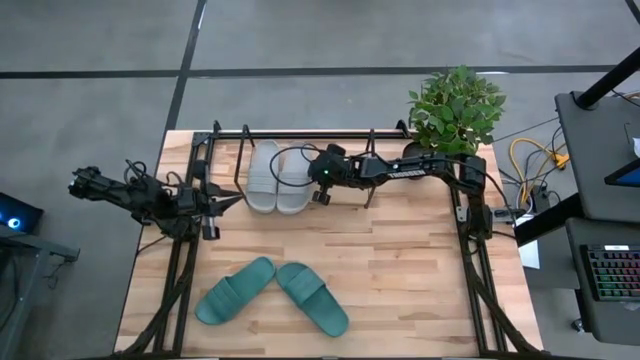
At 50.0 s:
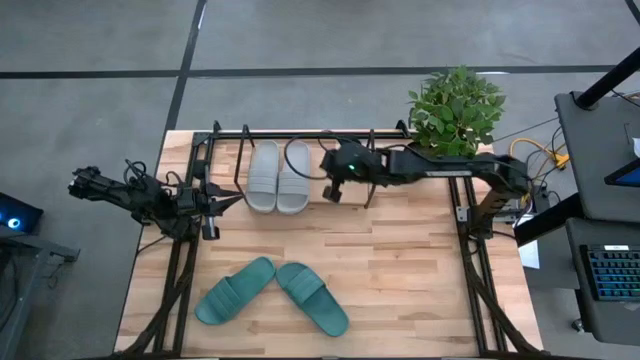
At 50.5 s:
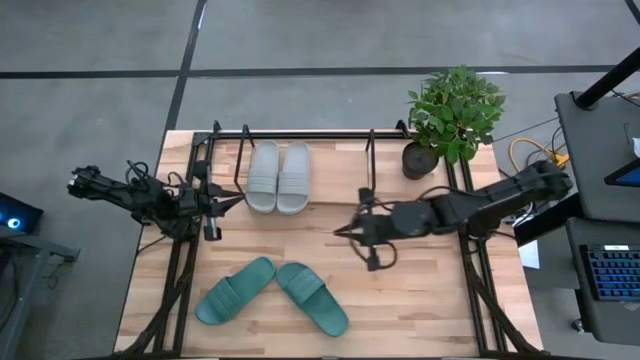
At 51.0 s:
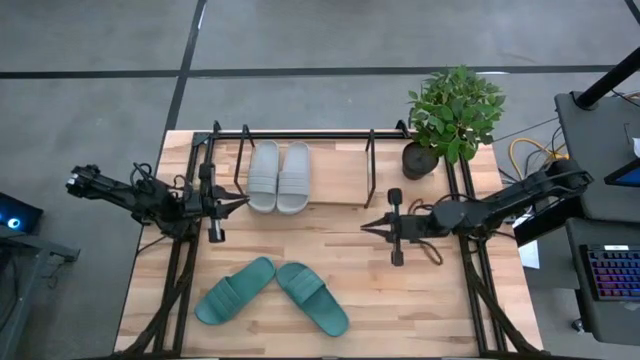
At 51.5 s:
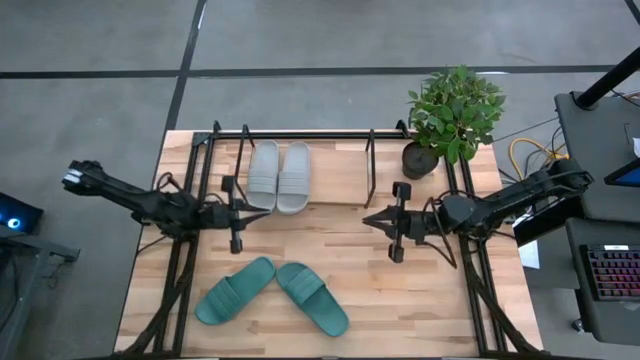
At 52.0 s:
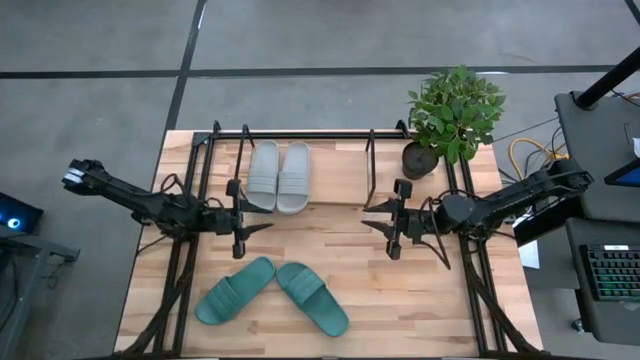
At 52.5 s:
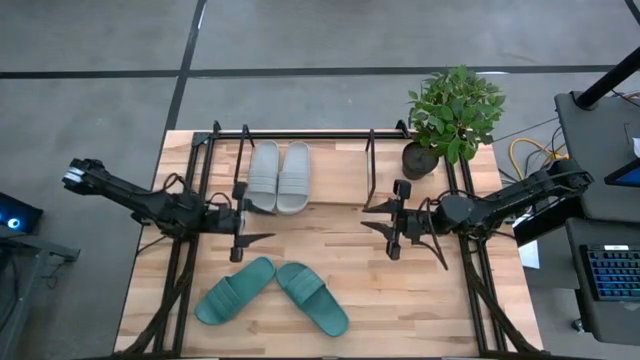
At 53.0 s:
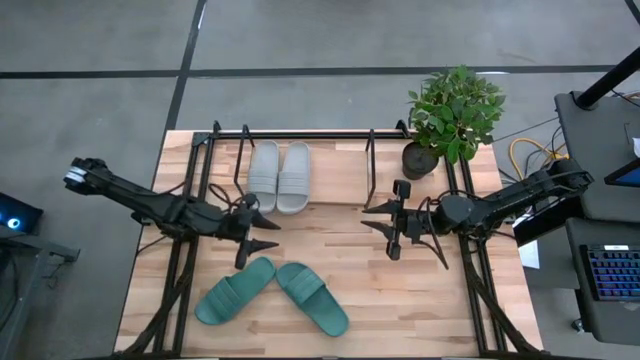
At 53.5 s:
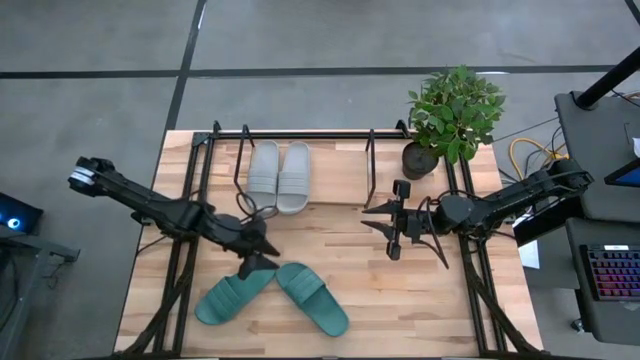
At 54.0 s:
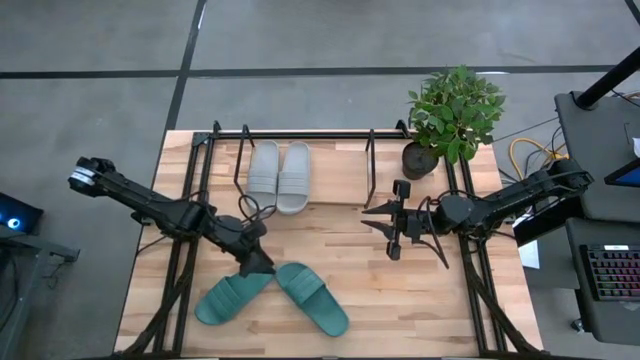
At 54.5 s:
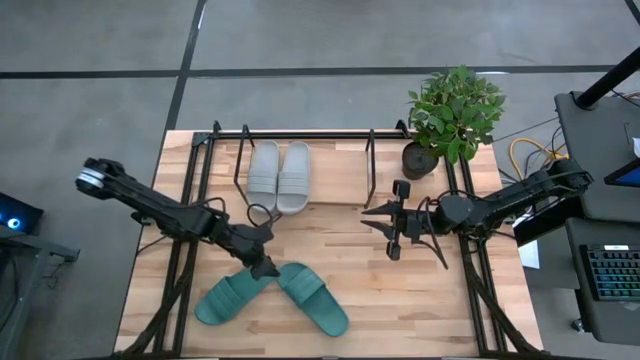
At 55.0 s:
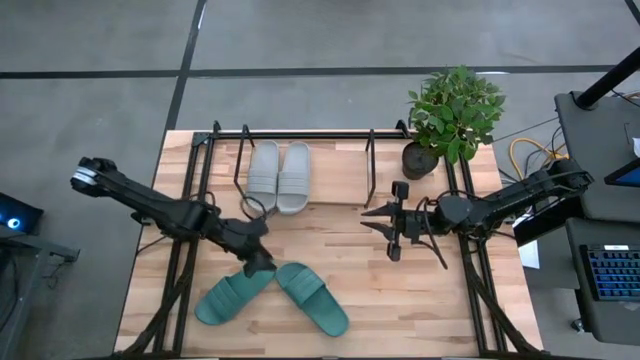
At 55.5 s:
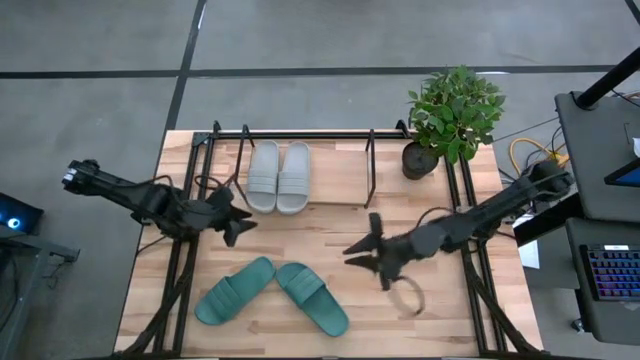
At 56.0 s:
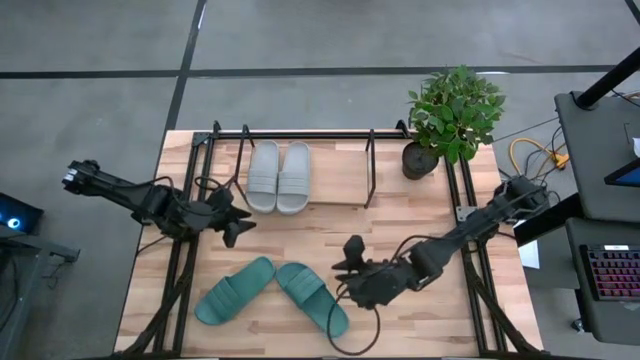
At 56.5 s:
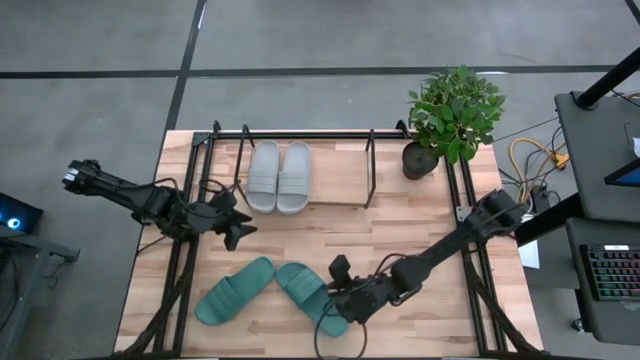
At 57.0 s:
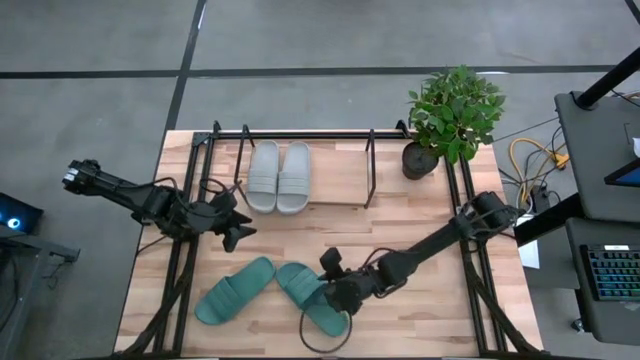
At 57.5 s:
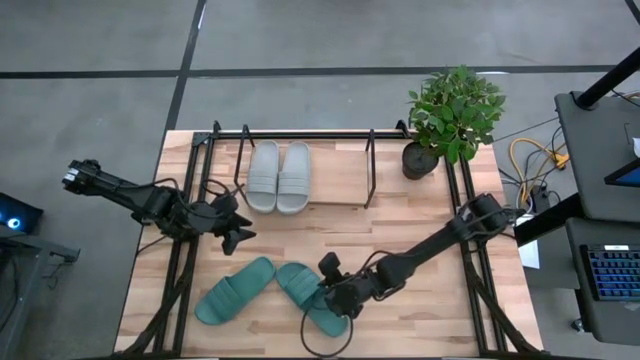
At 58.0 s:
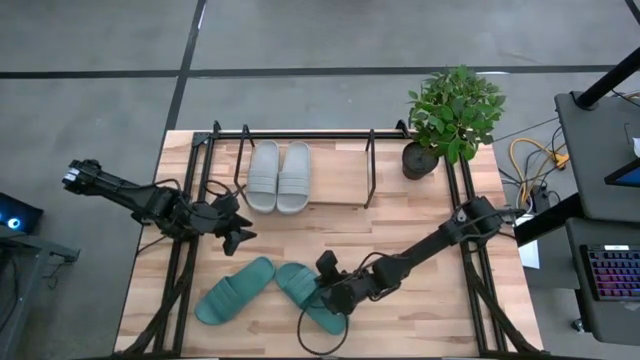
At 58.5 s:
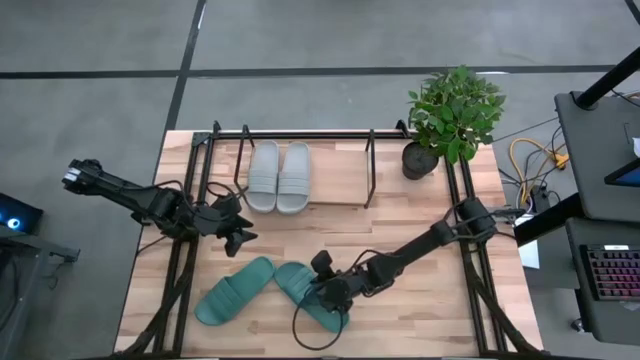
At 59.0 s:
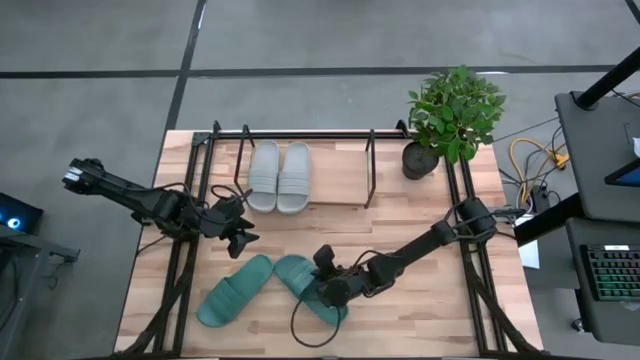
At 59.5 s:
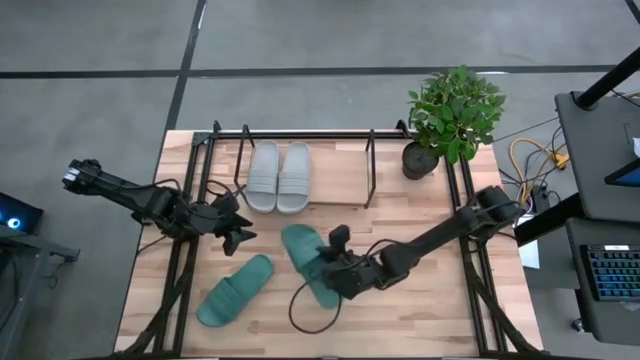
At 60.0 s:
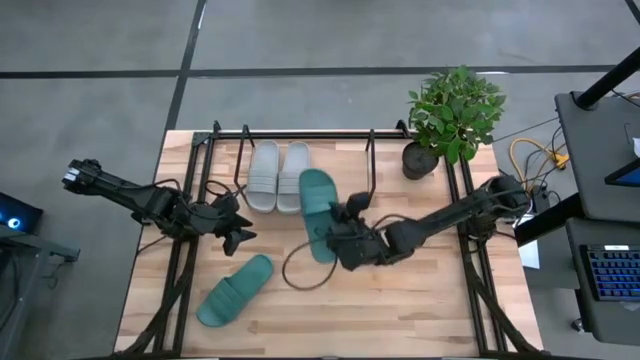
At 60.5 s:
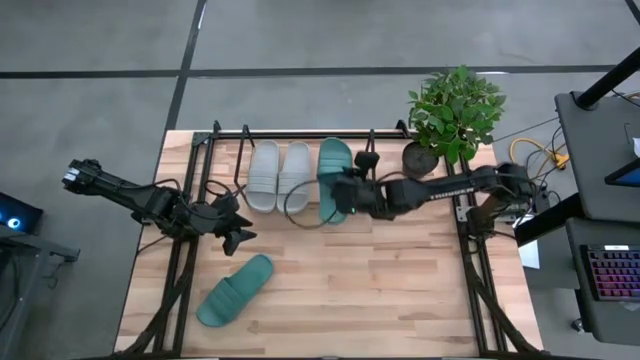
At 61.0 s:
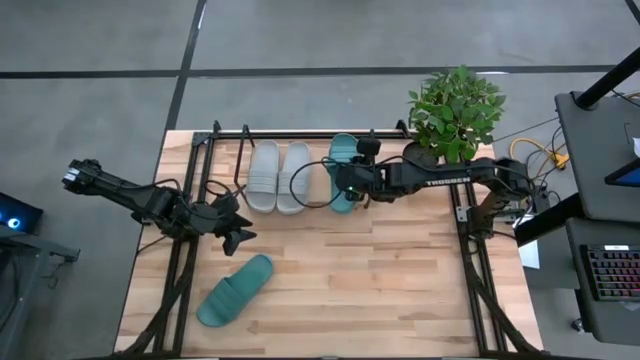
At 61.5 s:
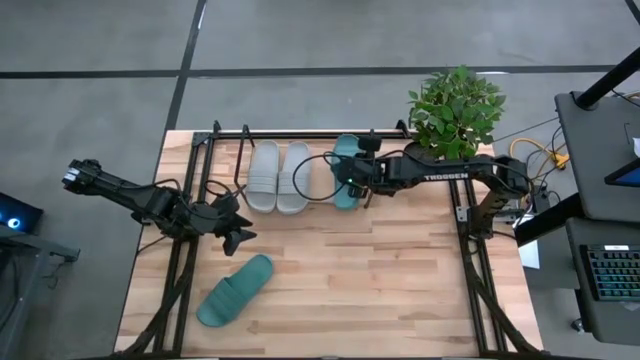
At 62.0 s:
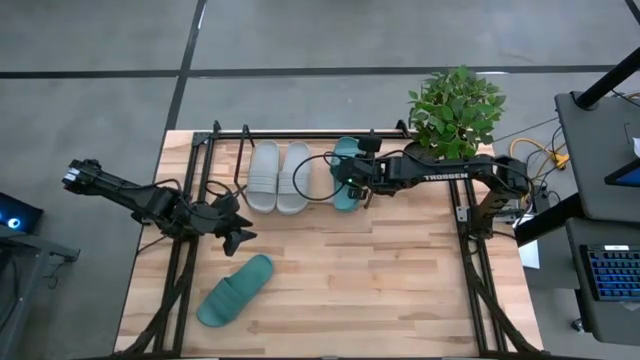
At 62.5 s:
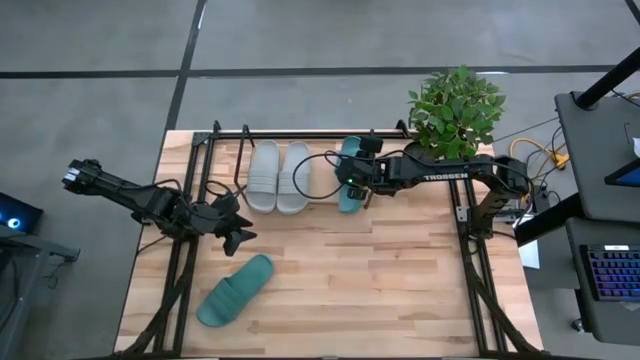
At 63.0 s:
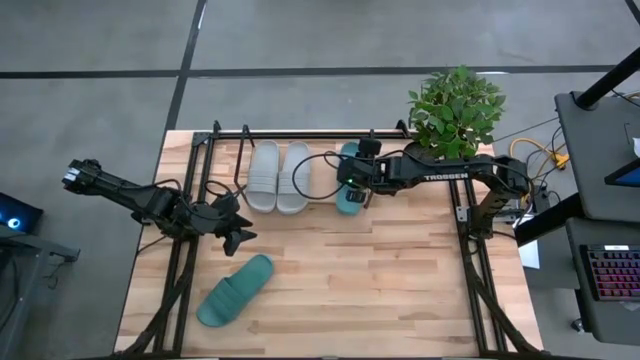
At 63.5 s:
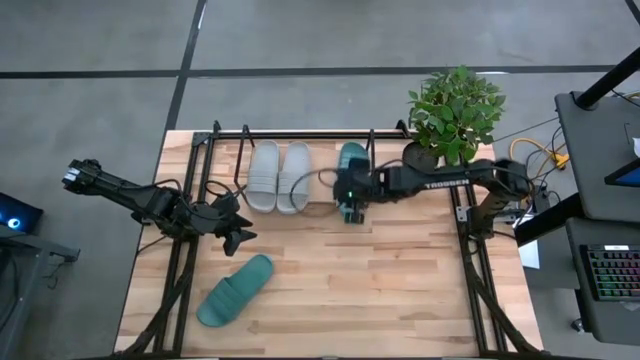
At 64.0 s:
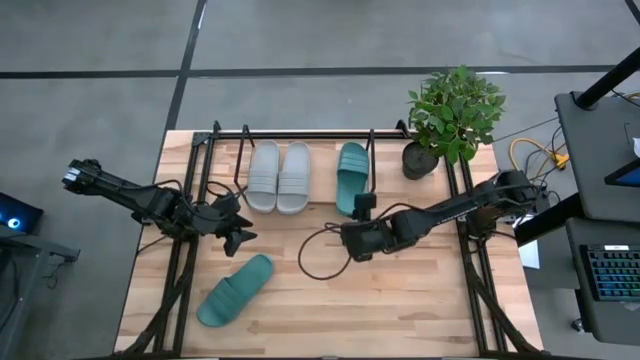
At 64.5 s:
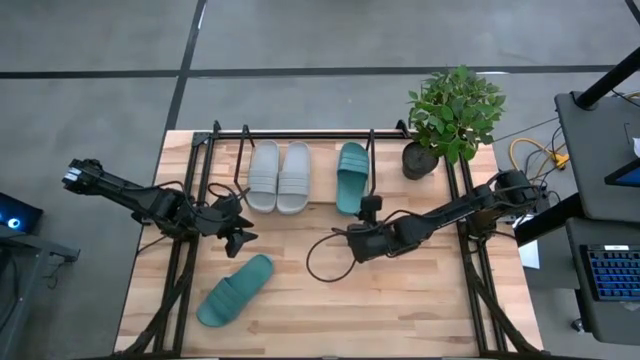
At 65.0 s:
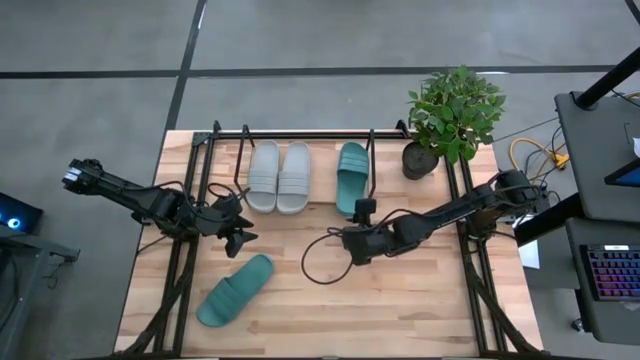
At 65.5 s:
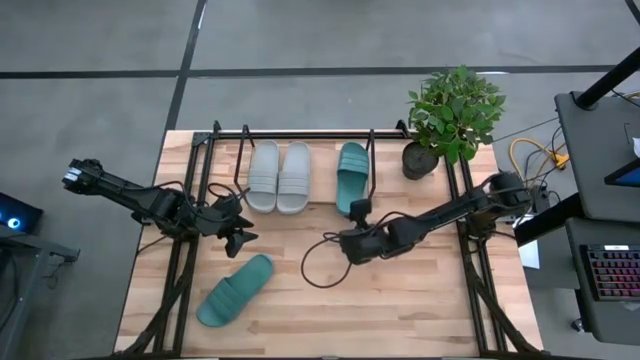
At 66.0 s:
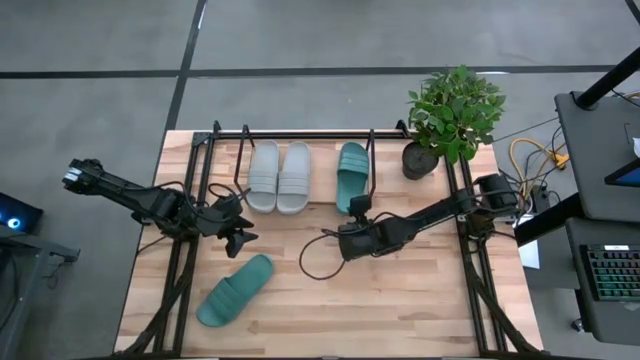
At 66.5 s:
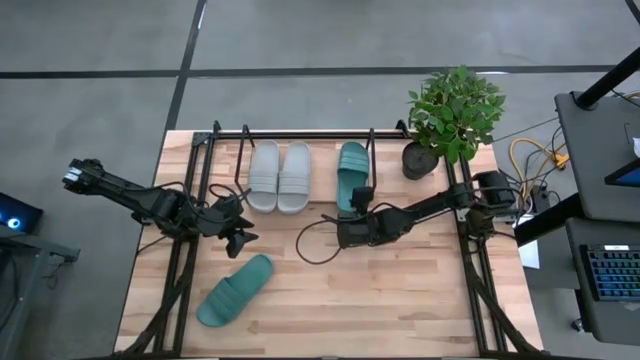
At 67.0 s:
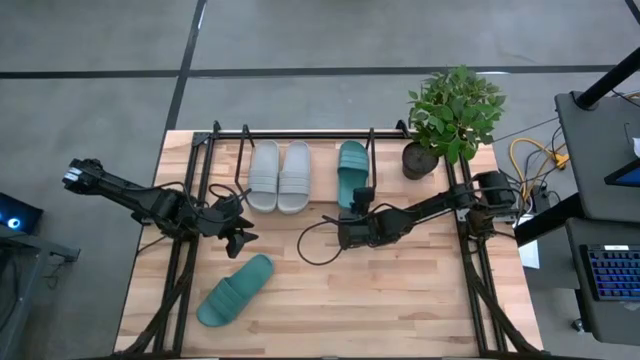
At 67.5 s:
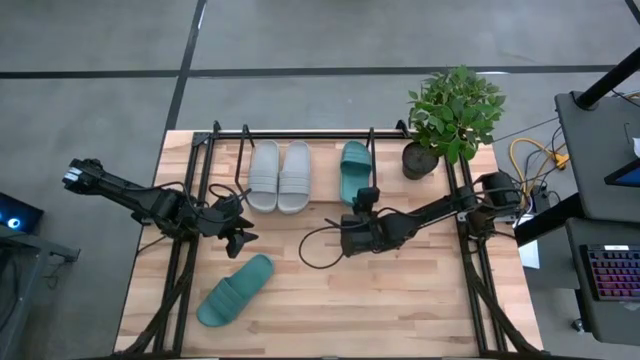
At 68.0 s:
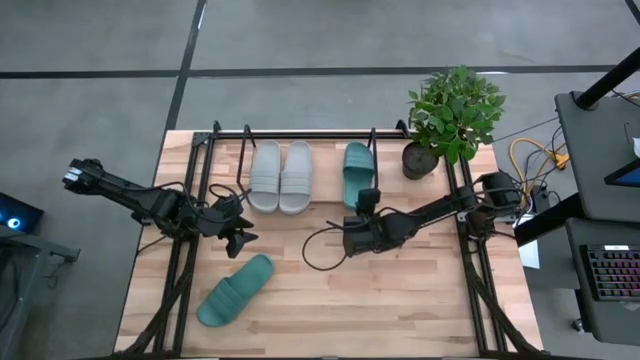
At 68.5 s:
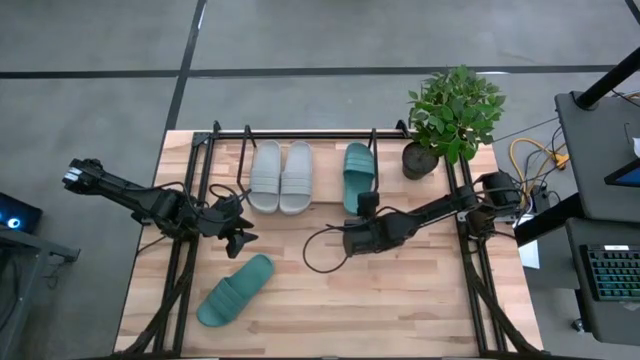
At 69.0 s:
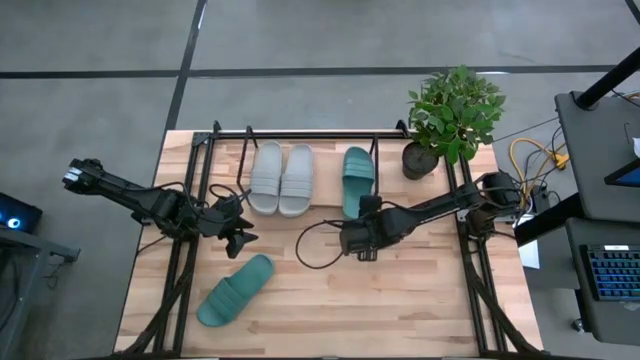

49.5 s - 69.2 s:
Task: Pick and place slides into the shelf
Put the right green slide on the shelf
